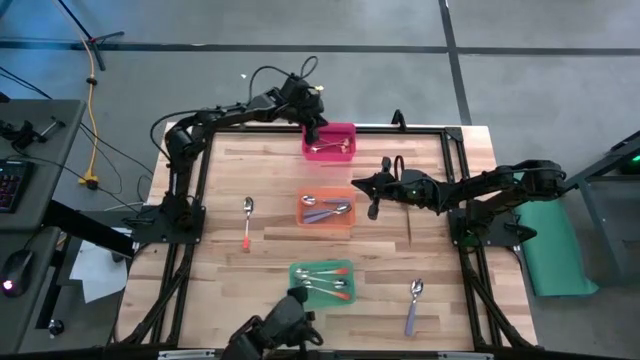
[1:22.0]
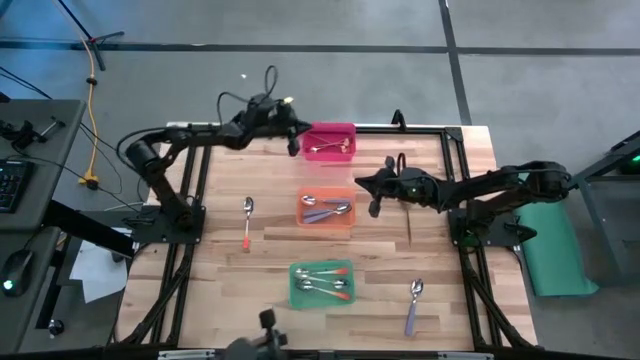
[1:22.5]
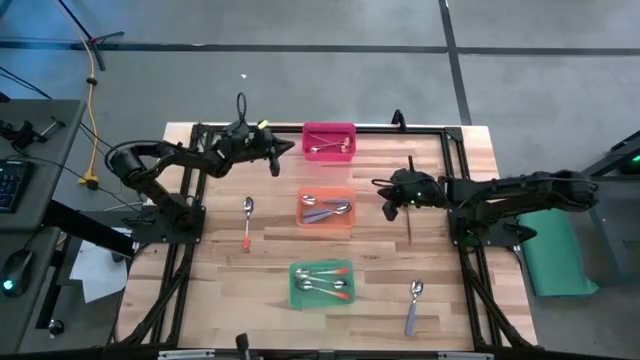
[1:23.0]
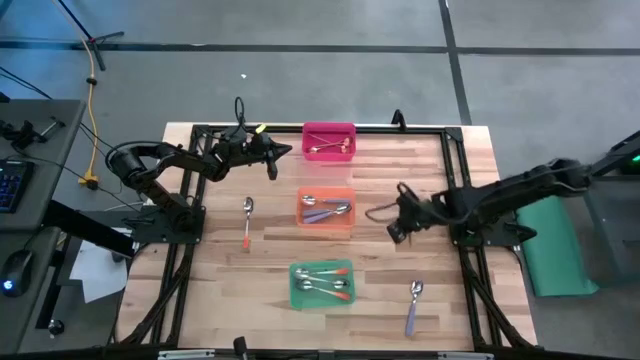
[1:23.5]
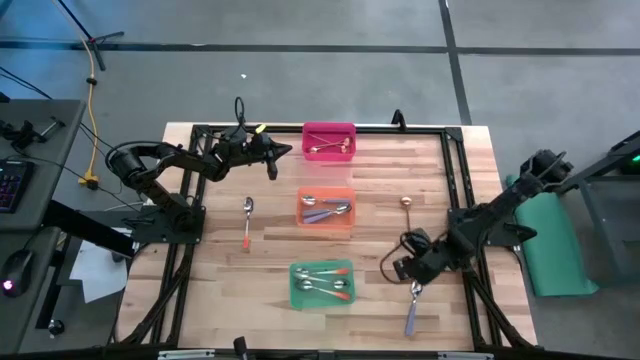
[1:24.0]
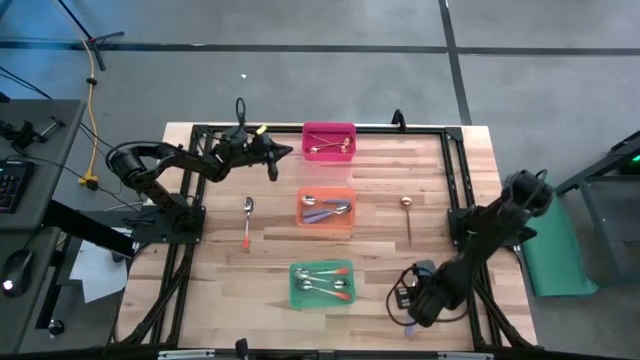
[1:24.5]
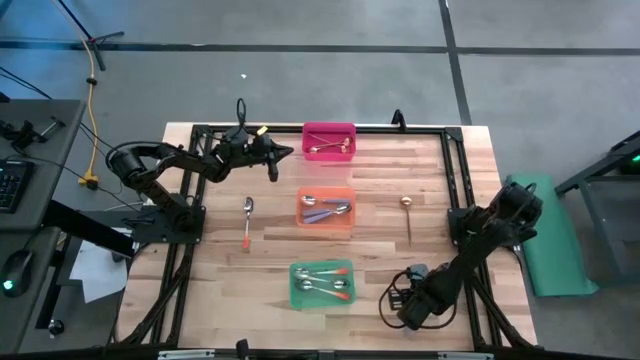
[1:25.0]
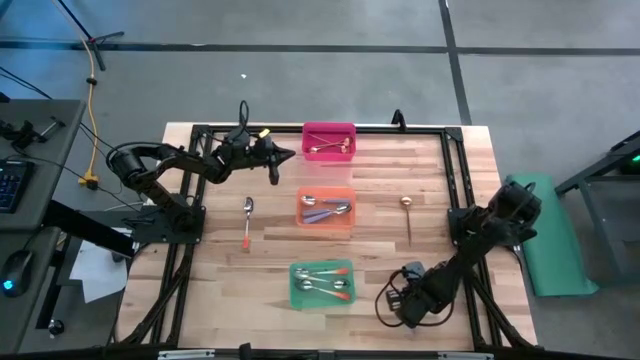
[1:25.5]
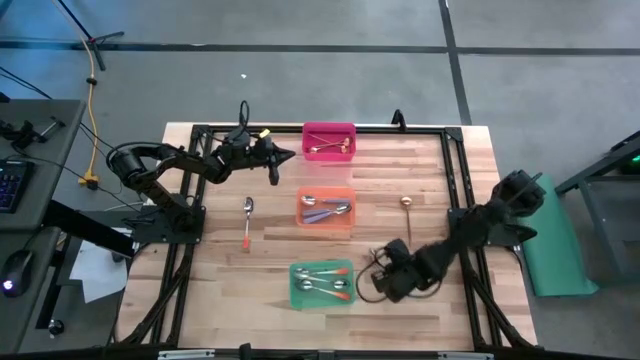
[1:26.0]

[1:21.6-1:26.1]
Task: Sort silverware by color (type)
Put the violet spoon into the orange bin

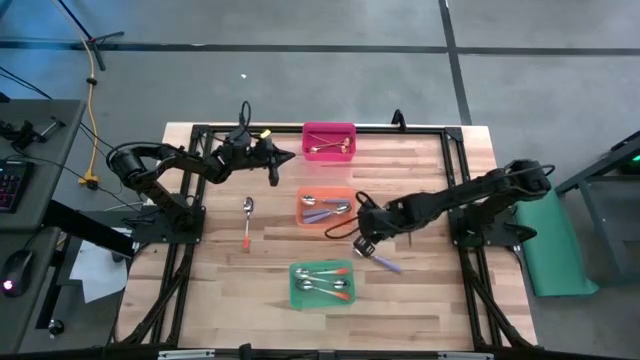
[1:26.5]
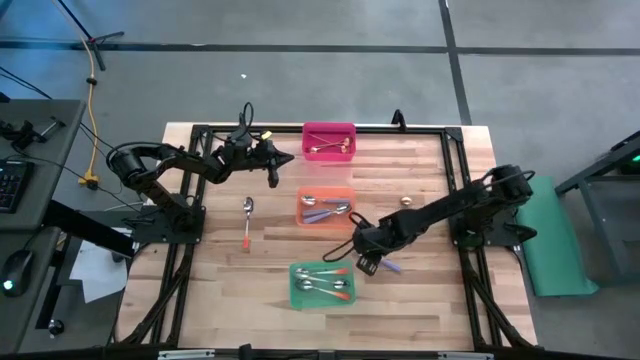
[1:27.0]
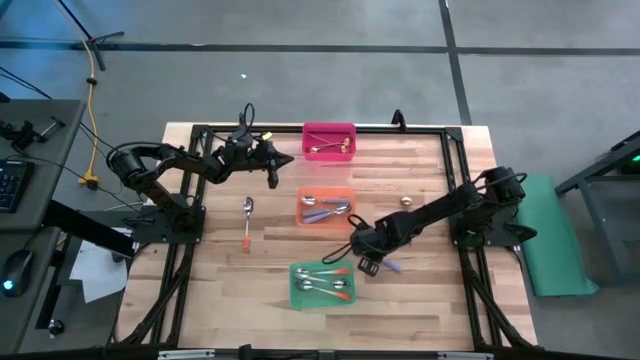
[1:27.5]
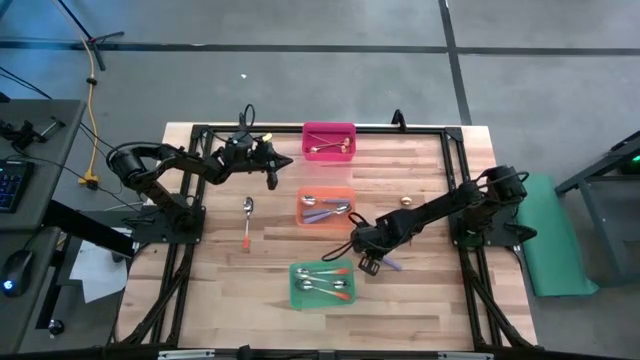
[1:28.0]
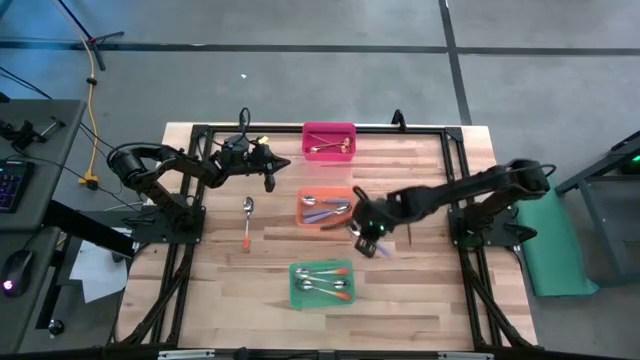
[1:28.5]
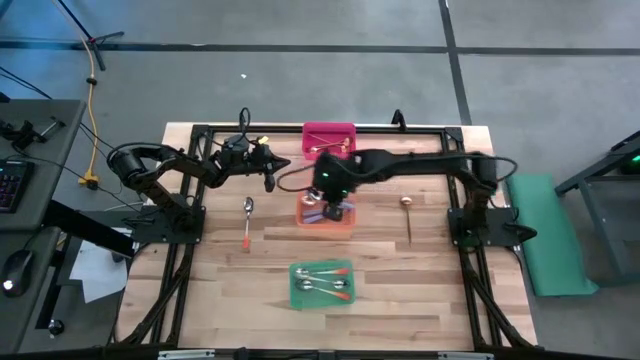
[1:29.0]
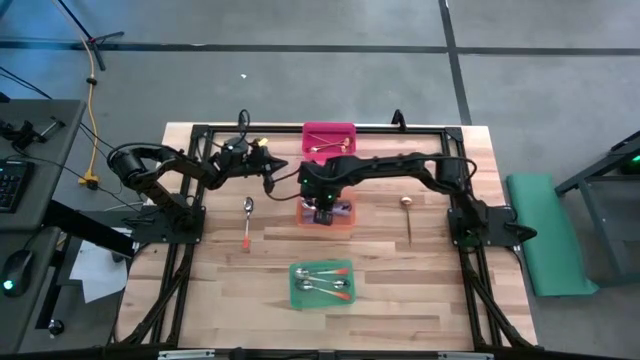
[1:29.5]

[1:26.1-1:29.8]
Put the violet spoon into the orange bin

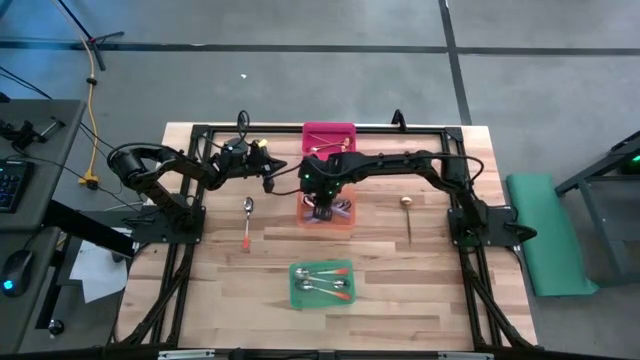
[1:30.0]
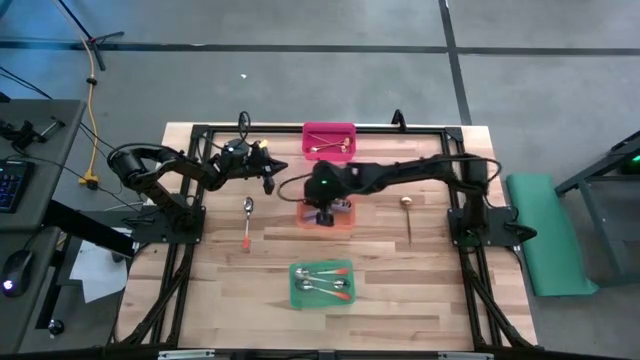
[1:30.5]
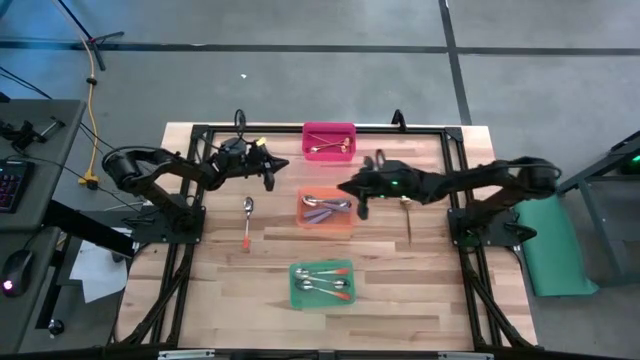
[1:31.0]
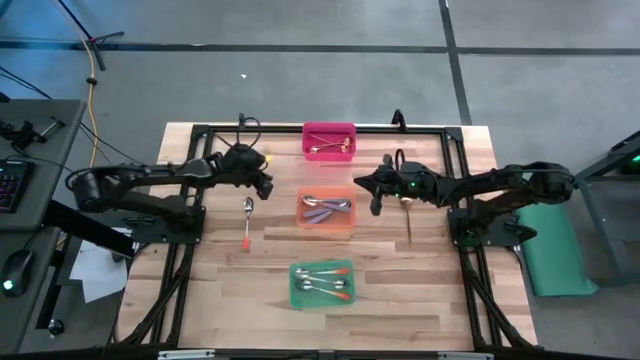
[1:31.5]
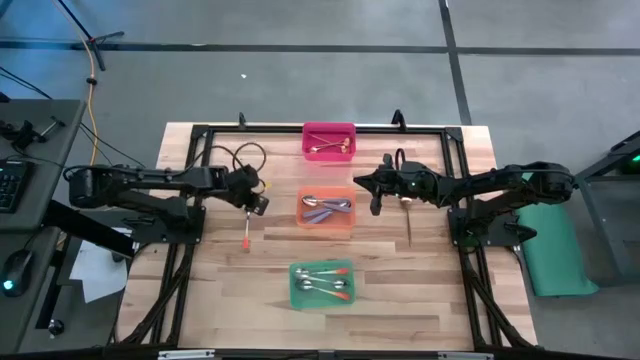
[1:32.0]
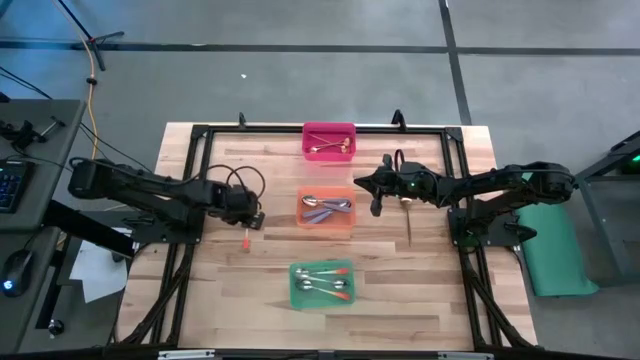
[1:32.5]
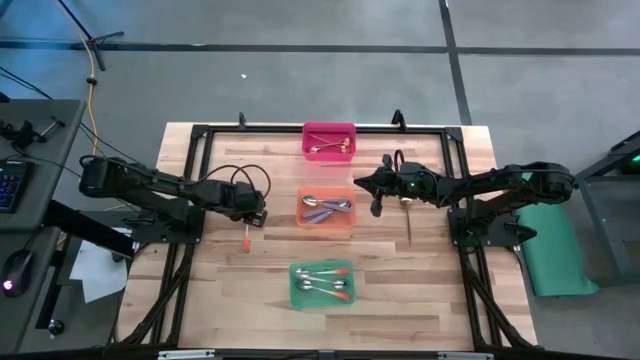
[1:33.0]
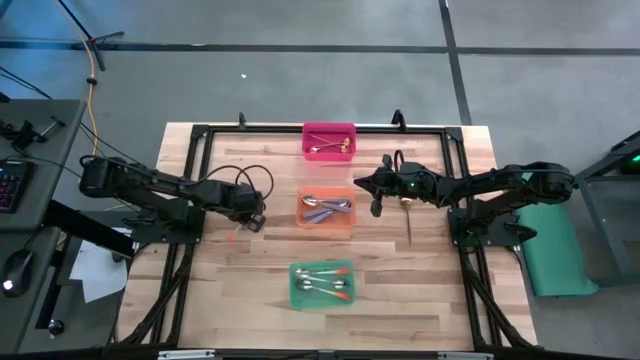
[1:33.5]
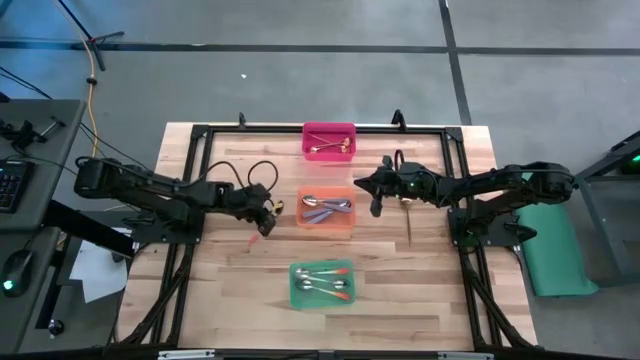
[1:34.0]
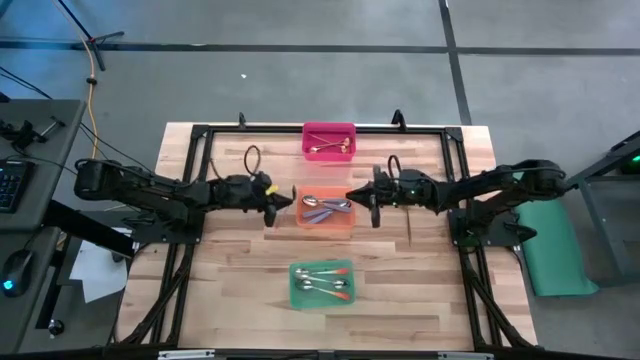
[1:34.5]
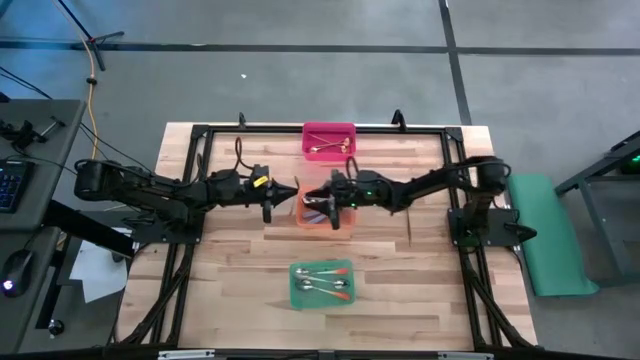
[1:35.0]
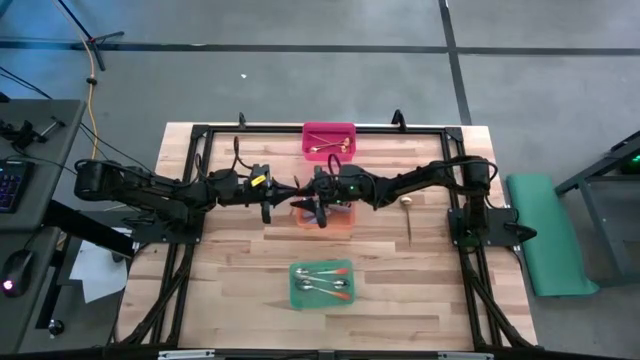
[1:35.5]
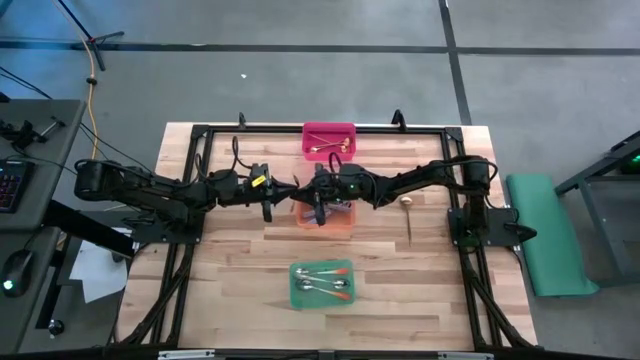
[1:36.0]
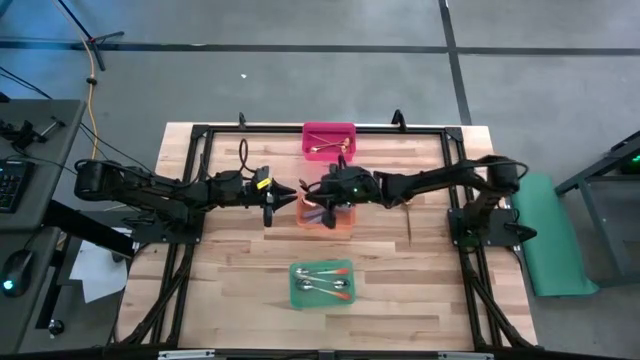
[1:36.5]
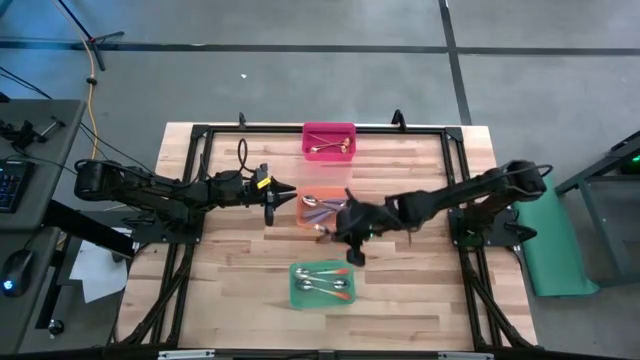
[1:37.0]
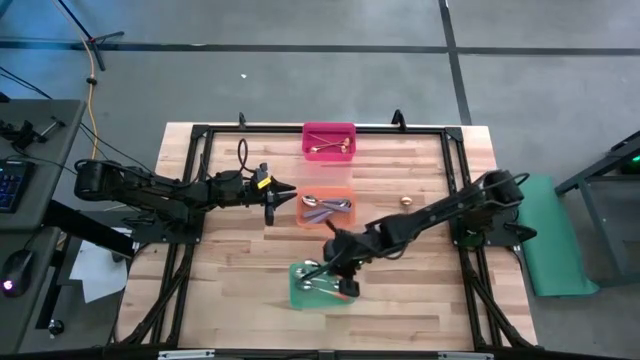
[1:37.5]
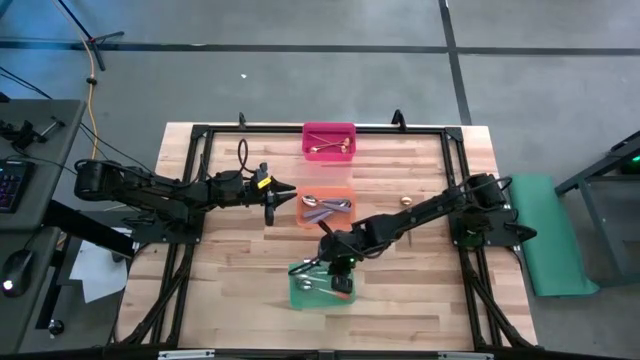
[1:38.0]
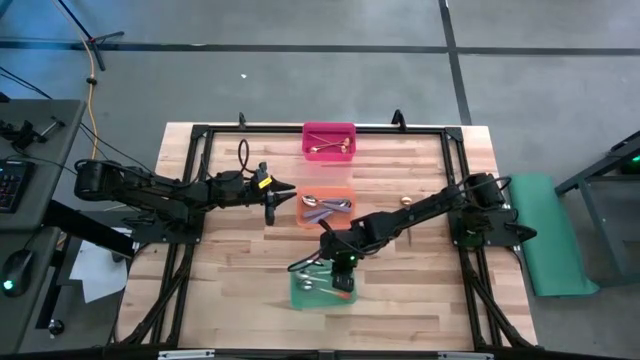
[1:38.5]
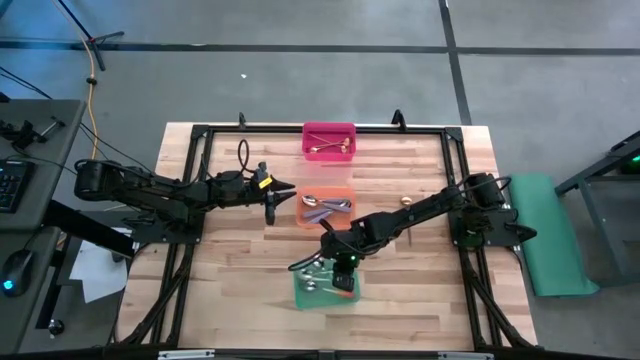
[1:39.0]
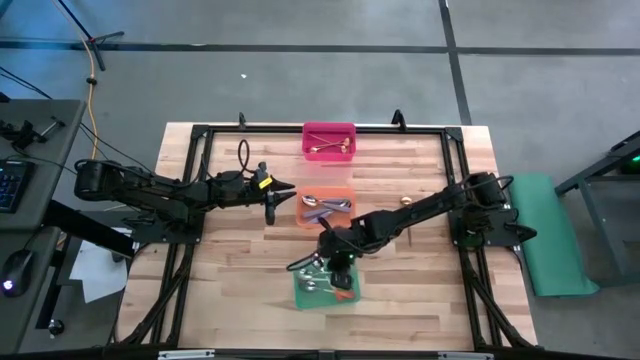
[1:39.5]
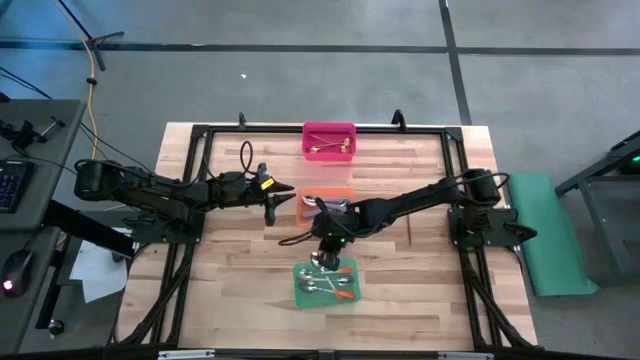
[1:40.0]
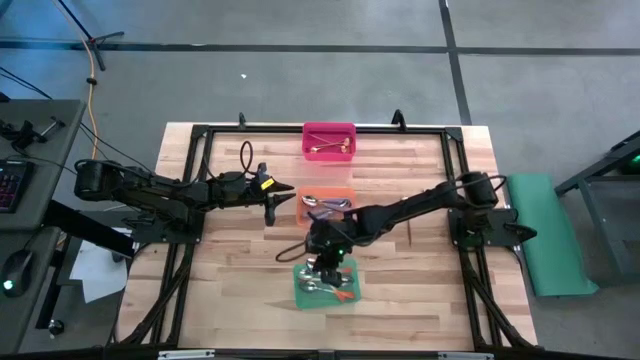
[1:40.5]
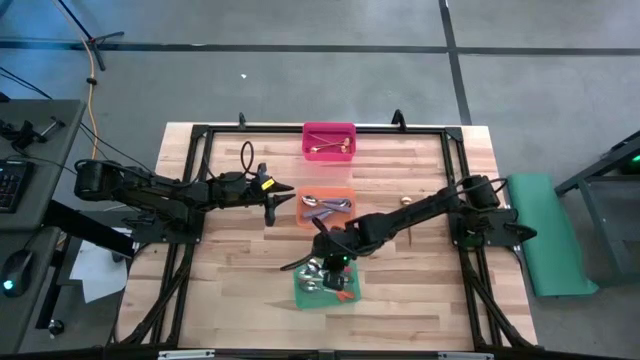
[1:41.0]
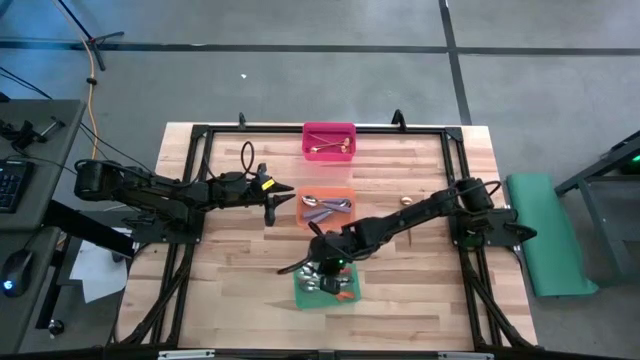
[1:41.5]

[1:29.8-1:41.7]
Put the orange spoon into the green bin

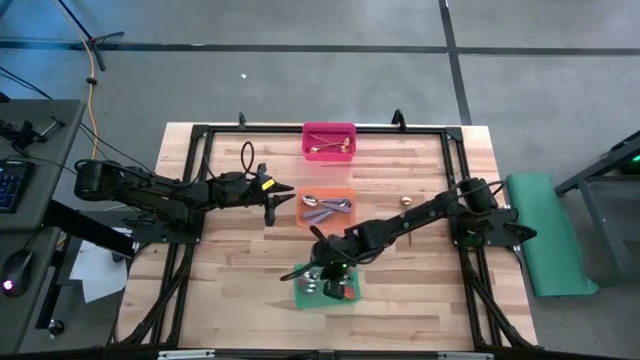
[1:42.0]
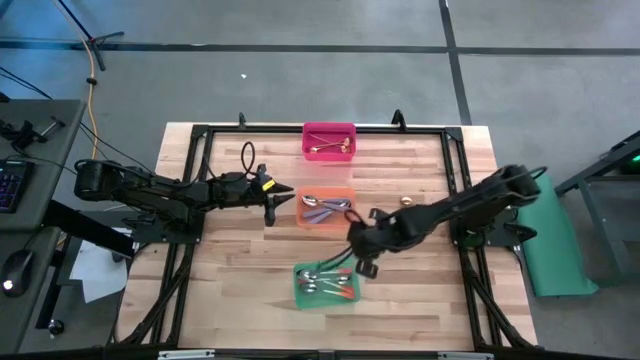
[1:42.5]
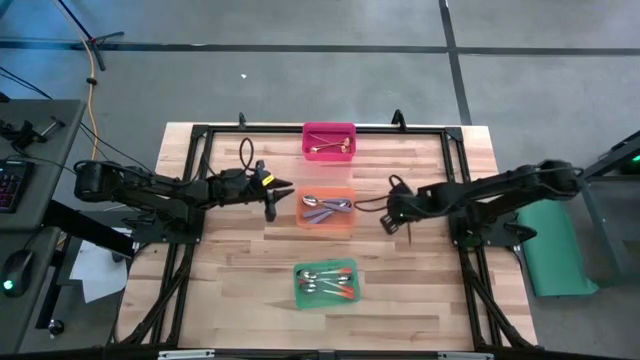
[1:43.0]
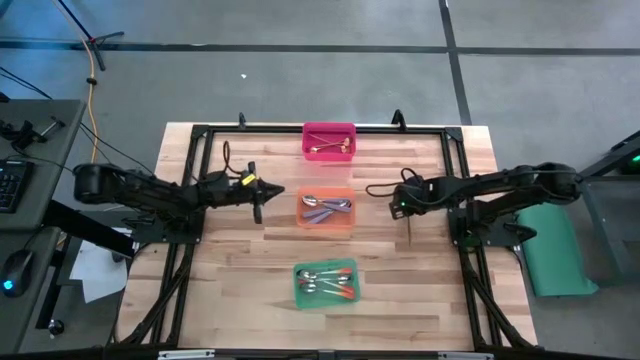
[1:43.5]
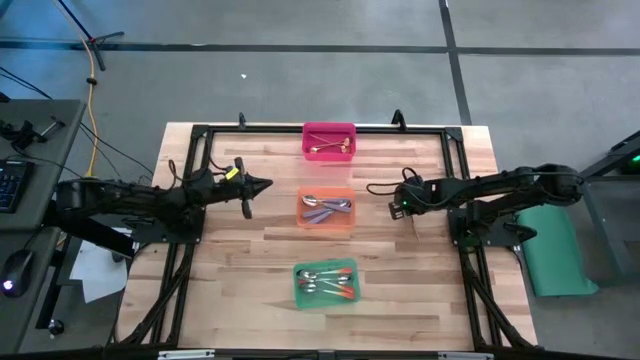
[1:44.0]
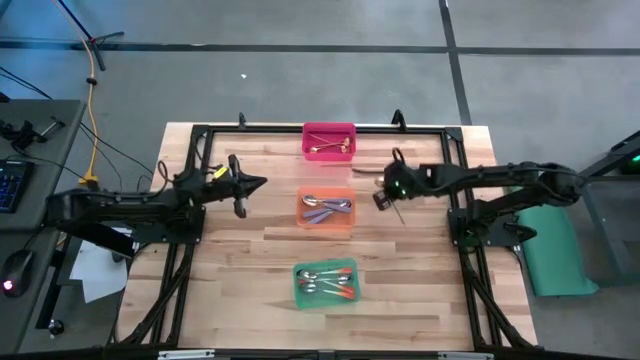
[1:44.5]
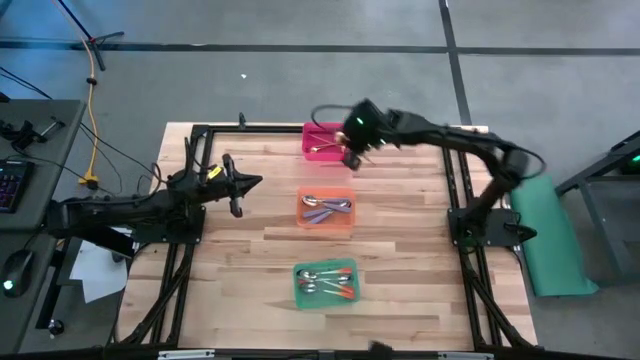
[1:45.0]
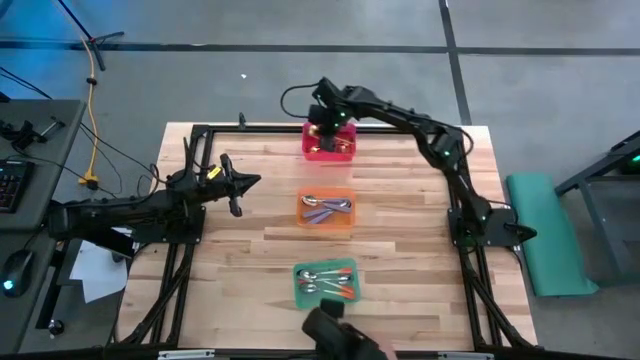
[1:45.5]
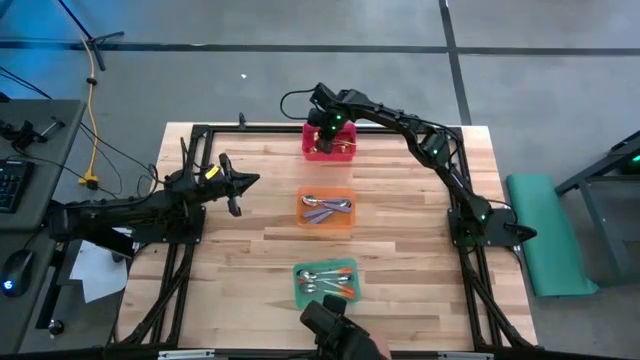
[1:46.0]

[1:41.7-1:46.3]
Put the gold spoon into the red bin
